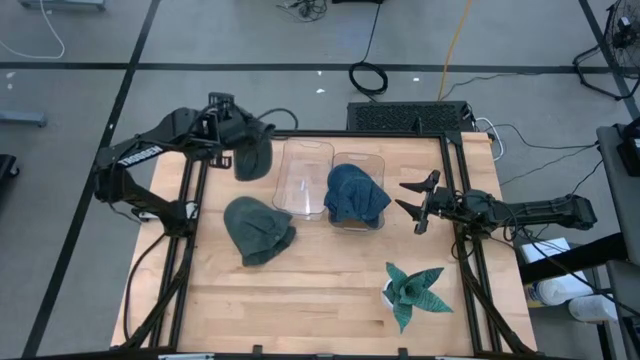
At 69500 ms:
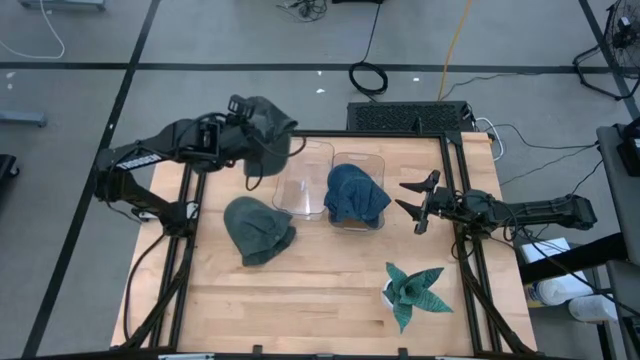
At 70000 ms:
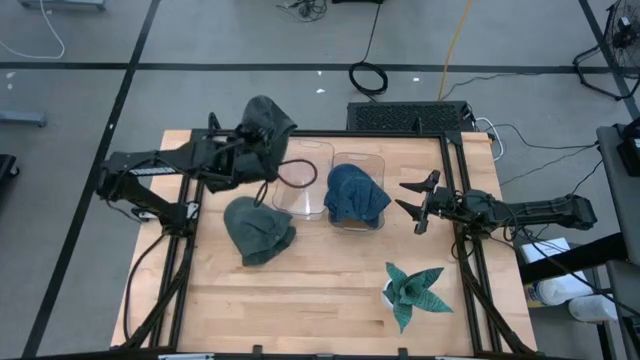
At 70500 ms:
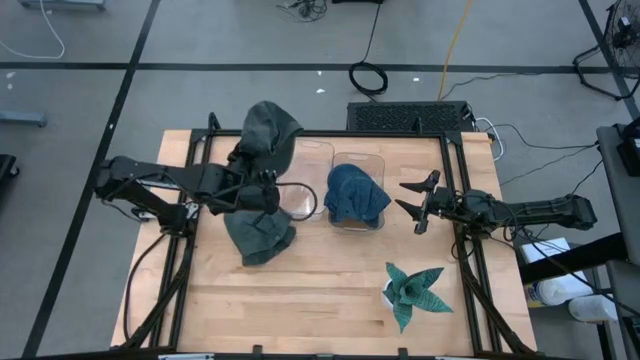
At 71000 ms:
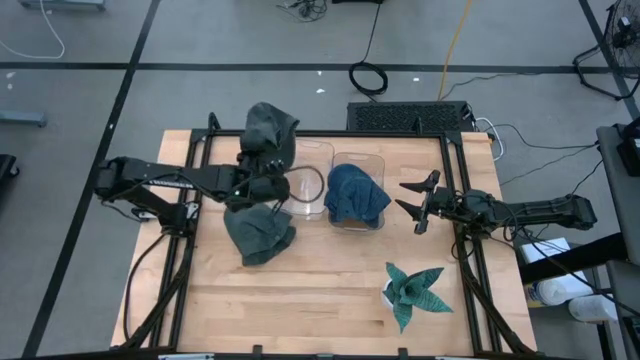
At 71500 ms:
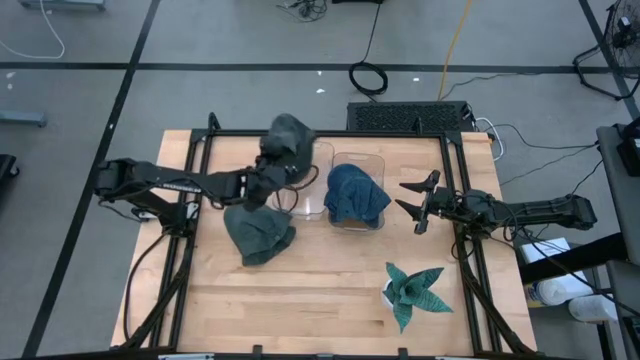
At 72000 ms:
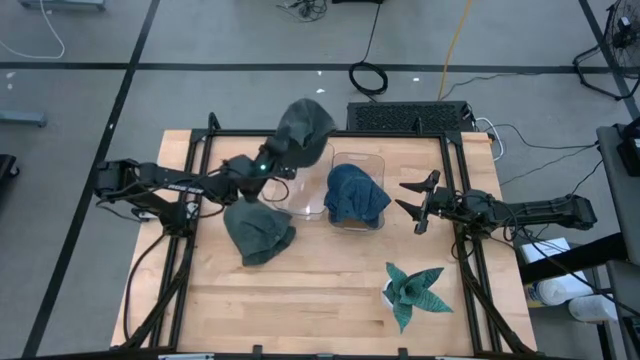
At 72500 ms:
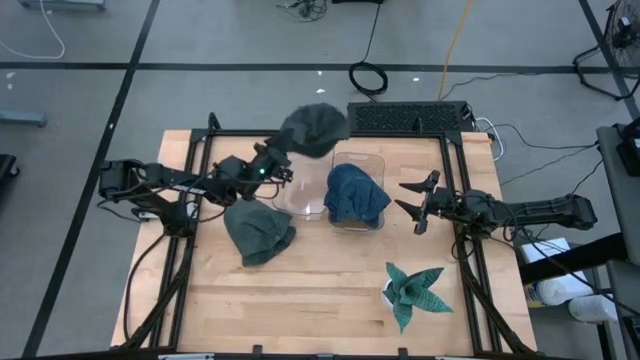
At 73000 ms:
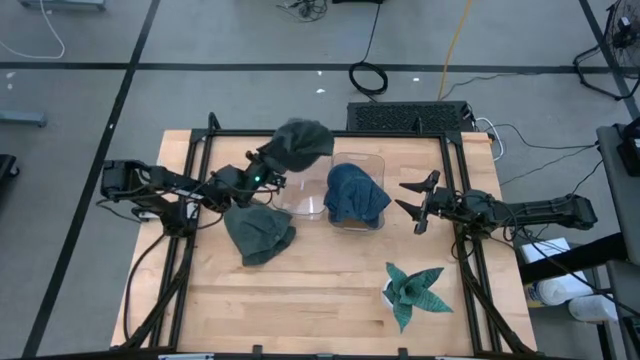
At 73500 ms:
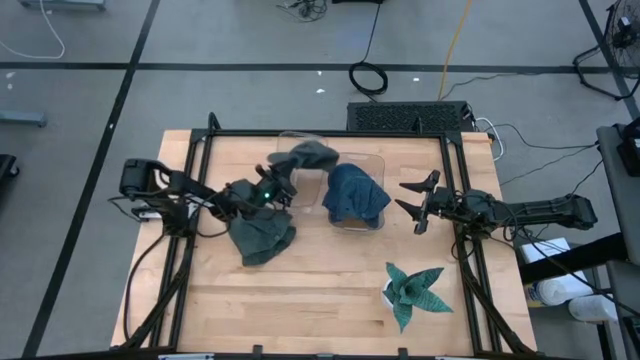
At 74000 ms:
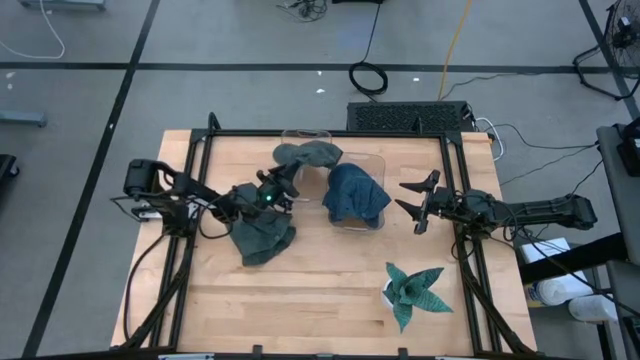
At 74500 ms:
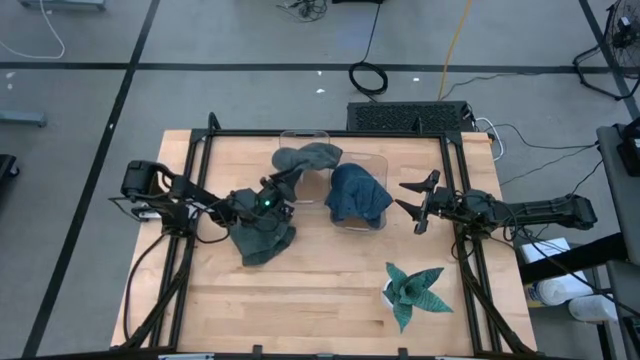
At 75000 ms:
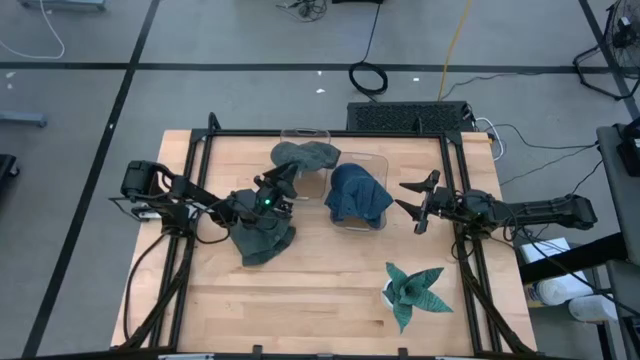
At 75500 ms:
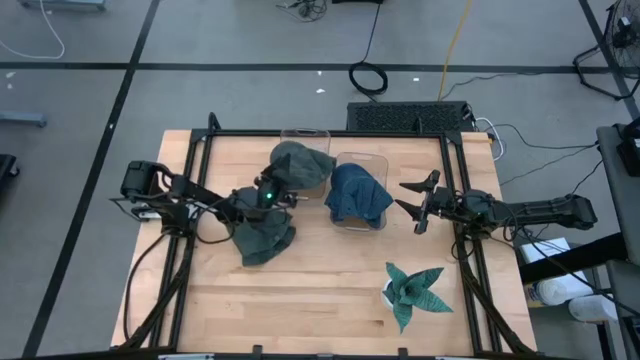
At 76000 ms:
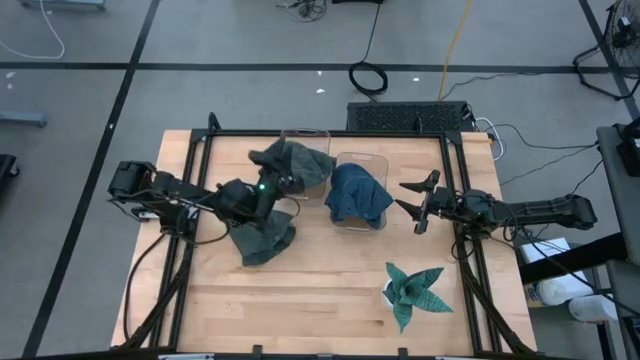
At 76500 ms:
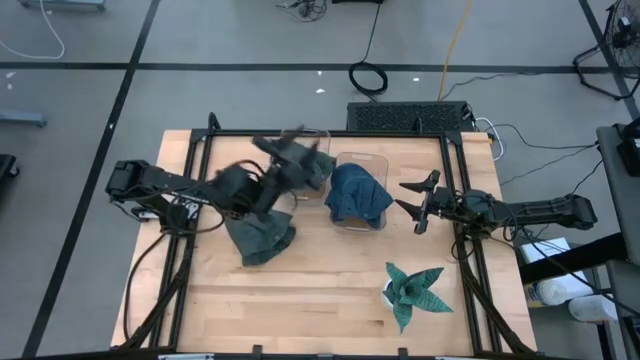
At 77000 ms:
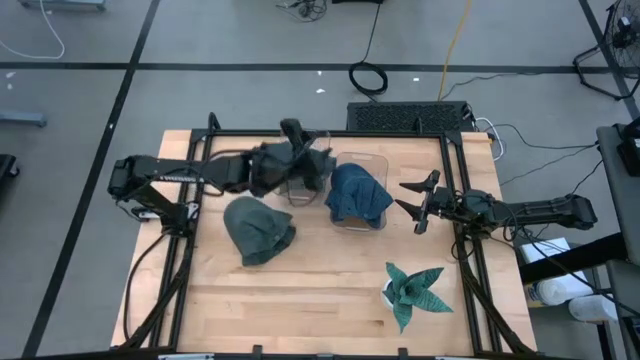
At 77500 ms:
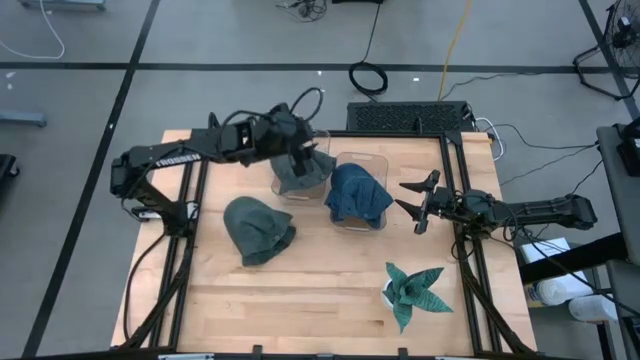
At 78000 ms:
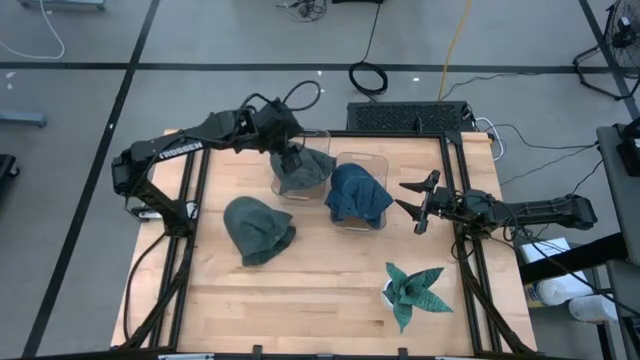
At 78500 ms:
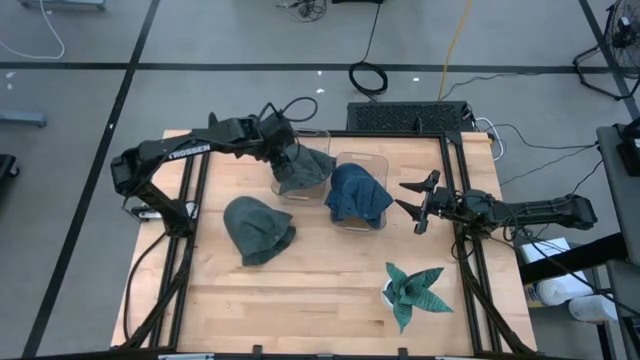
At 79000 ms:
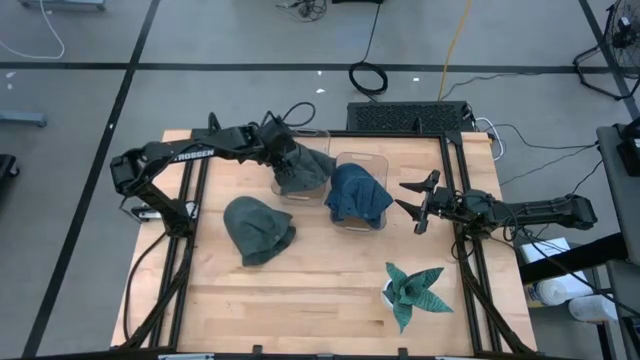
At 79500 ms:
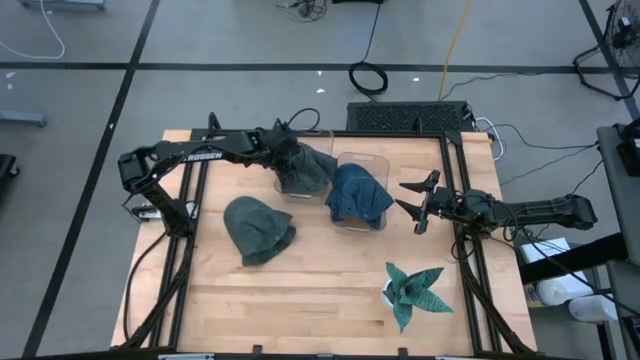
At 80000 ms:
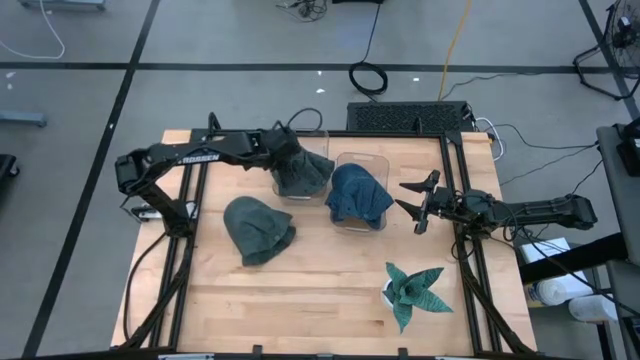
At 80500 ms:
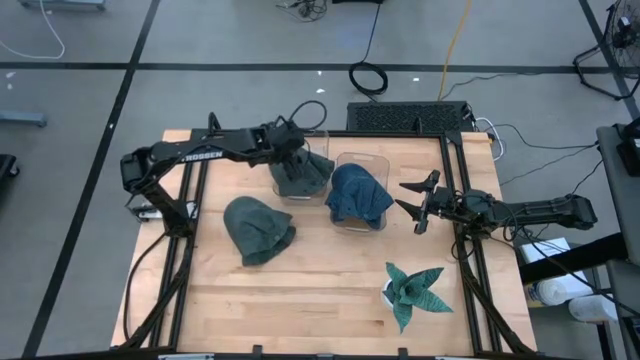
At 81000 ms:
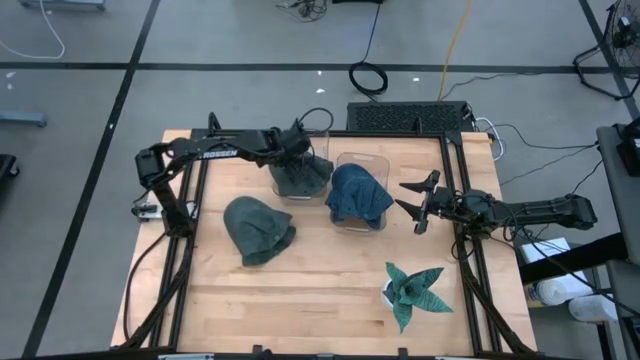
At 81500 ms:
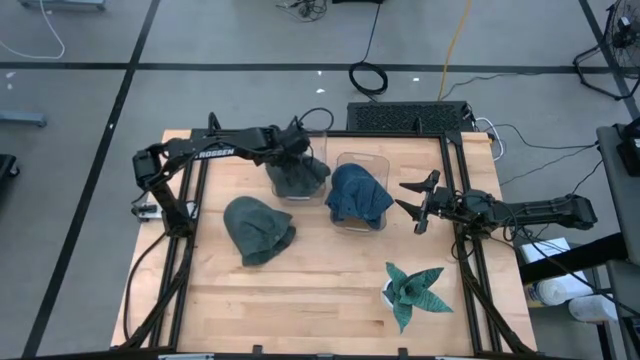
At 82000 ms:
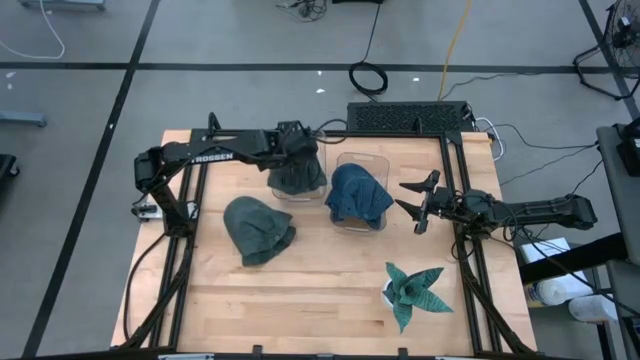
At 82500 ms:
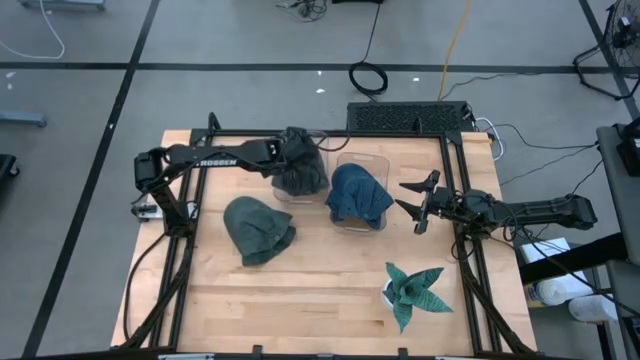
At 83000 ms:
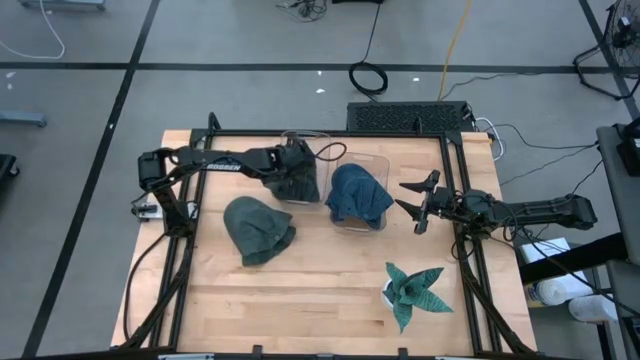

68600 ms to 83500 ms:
Task: Pick & Place hat
Put the top black cap into the left transparent bin
